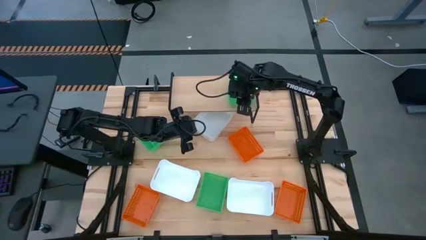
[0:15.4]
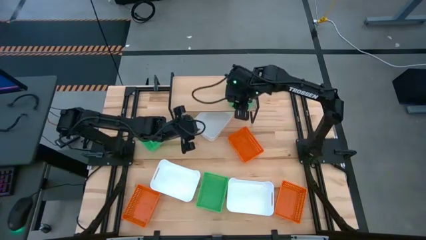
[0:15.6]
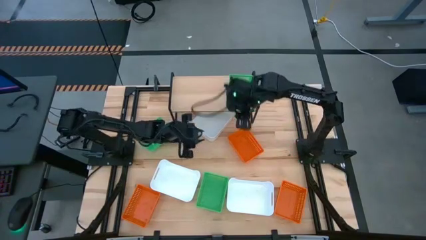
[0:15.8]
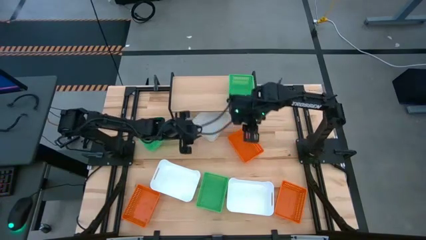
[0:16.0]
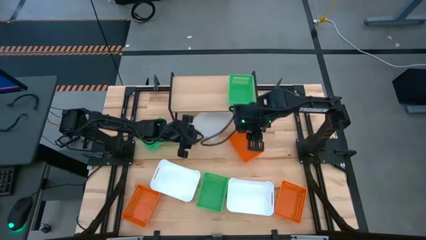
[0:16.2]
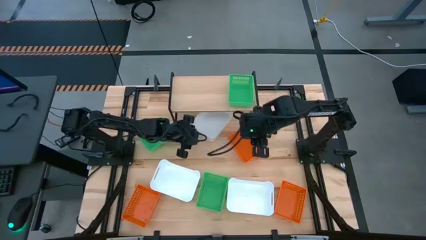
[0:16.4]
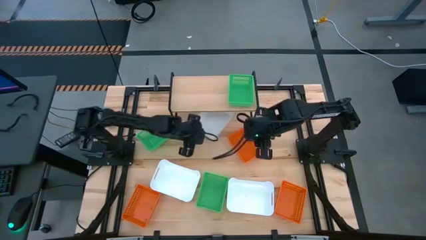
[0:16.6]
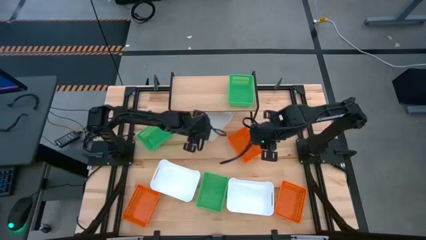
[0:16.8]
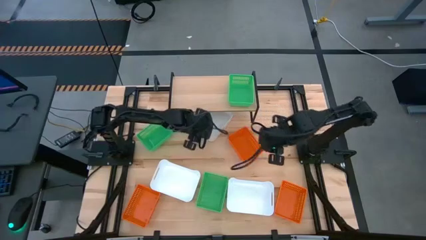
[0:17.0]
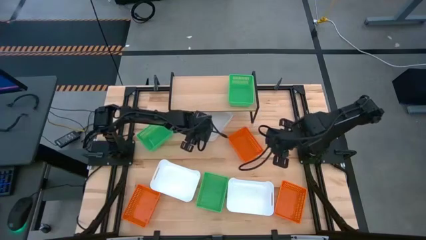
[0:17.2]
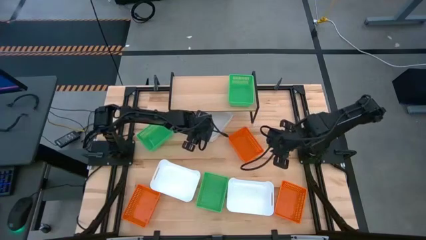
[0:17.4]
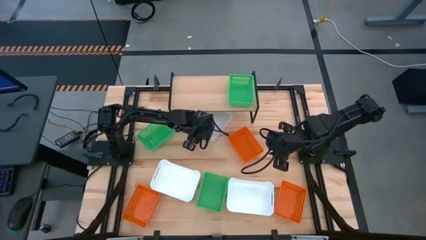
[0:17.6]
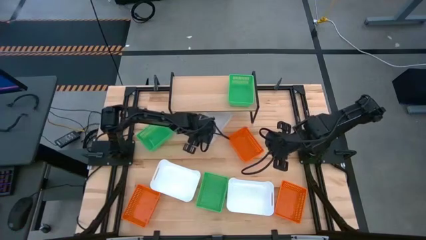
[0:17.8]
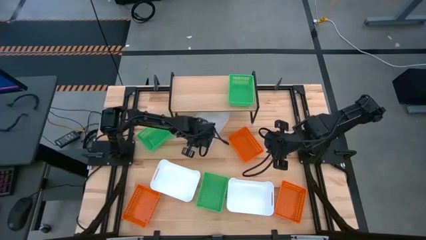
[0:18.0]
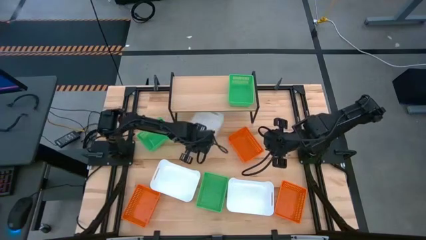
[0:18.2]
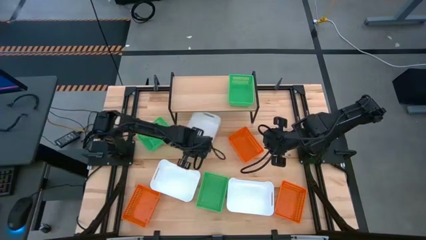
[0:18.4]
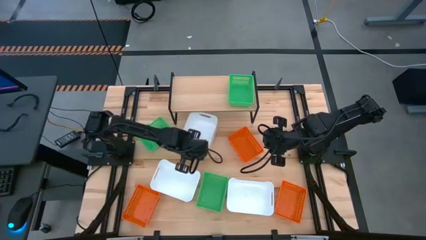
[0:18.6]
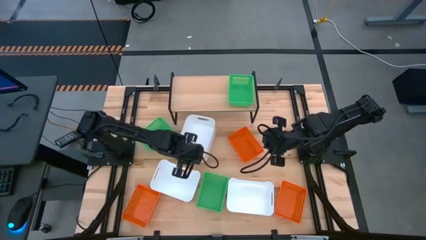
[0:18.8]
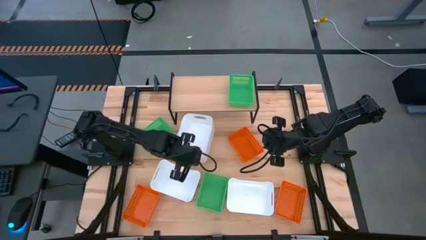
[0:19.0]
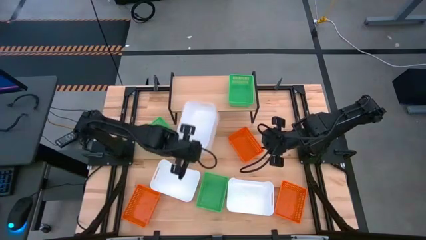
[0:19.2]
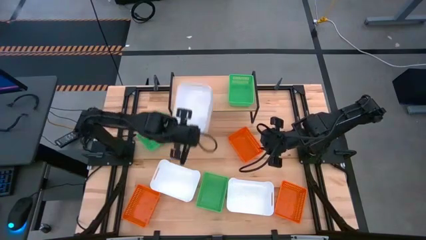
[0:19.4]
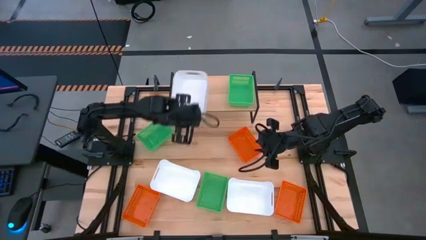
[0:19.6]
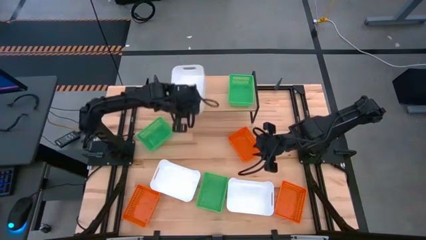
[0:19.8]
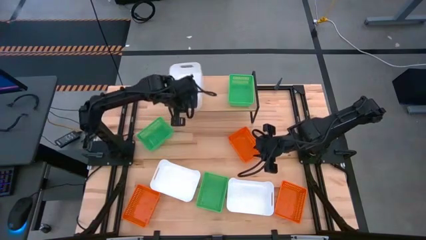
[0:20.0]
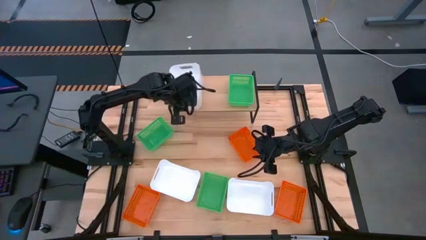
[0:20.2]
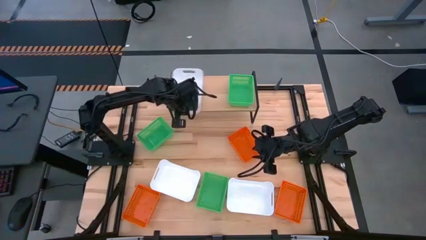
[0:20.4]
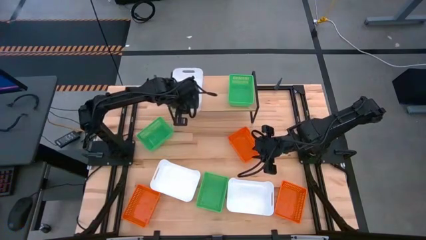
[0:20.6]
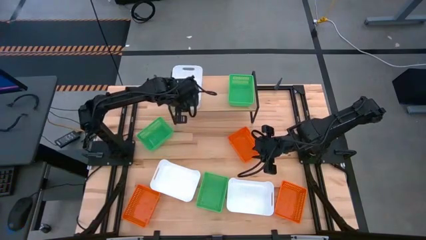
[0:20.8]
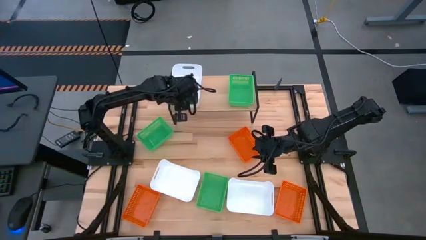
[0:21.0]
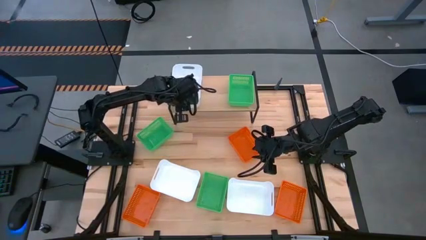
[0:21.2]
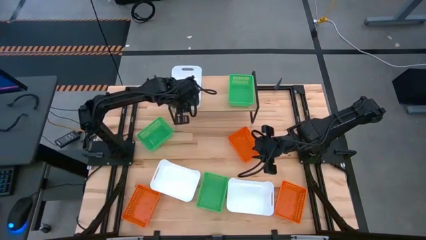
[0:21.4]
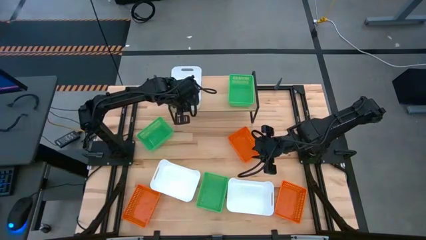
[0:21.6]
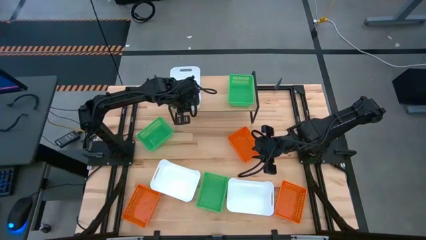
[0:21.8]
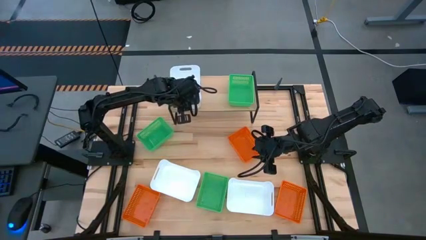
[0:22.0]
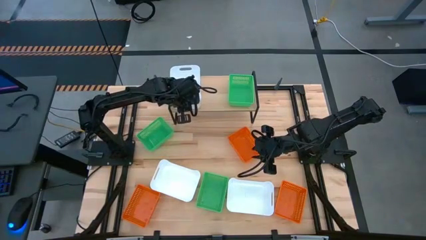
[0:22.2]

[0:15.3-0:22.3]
Task: Stack baskets on shelf by color
Put the top white bin on the shelf

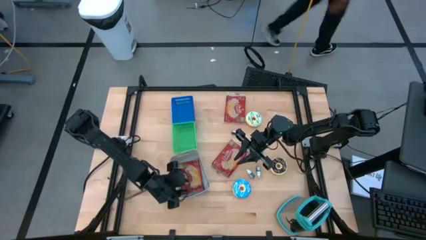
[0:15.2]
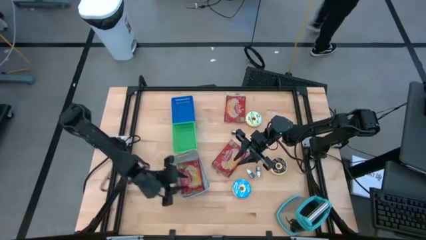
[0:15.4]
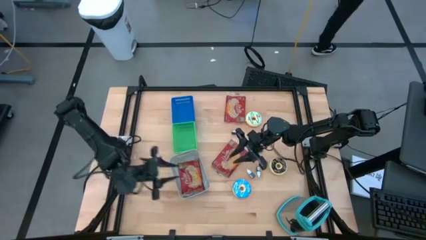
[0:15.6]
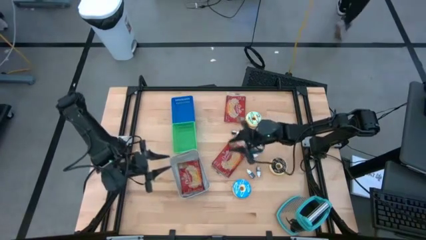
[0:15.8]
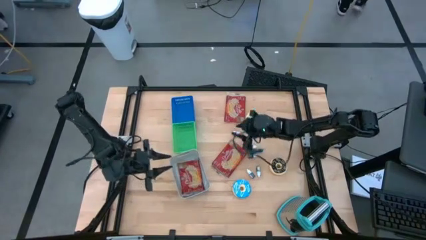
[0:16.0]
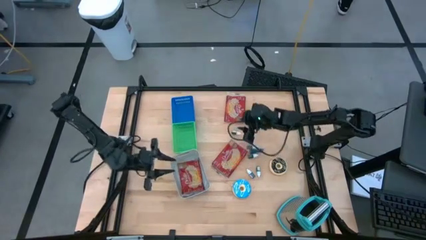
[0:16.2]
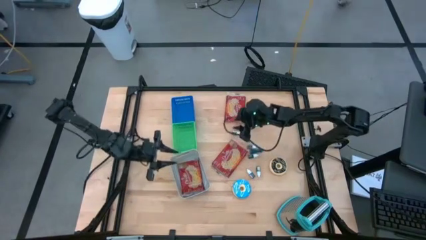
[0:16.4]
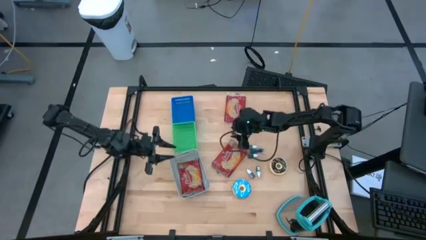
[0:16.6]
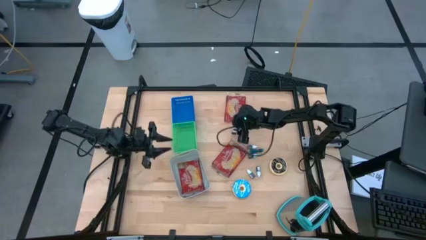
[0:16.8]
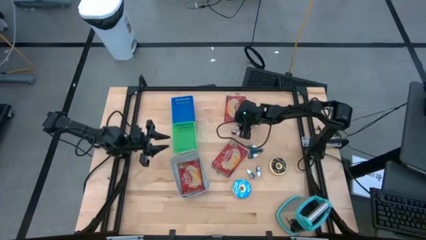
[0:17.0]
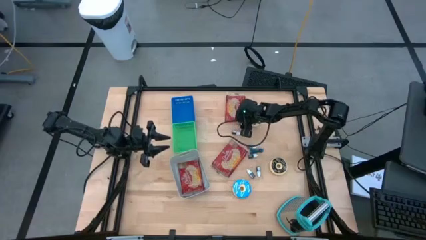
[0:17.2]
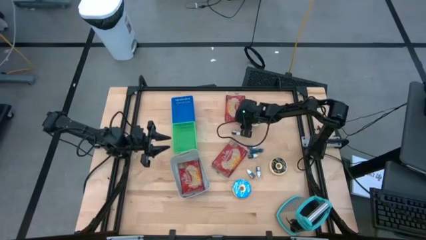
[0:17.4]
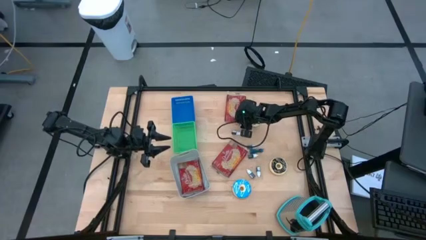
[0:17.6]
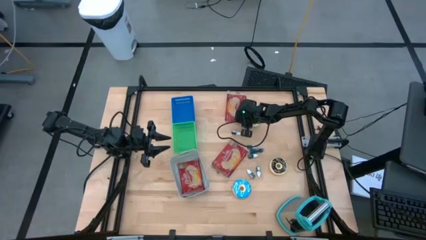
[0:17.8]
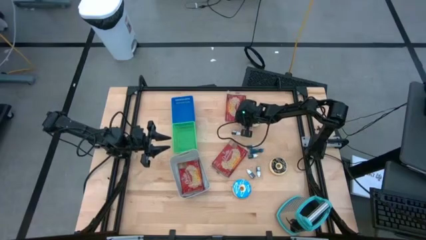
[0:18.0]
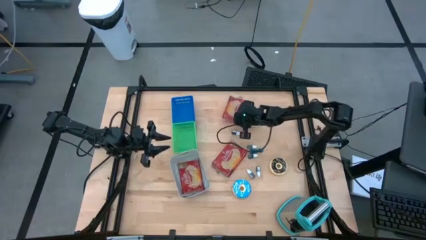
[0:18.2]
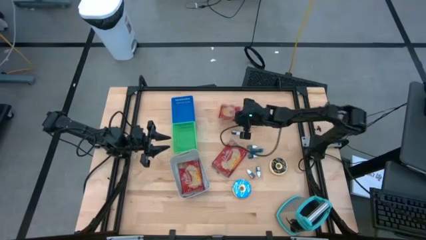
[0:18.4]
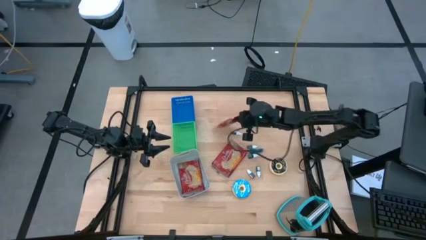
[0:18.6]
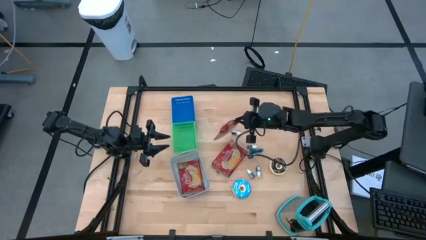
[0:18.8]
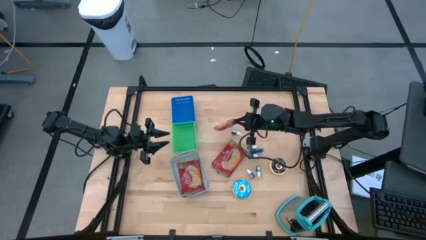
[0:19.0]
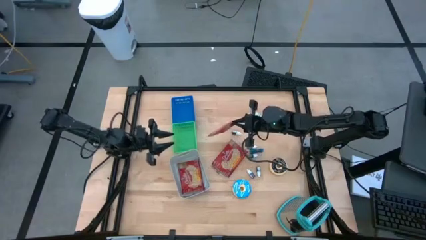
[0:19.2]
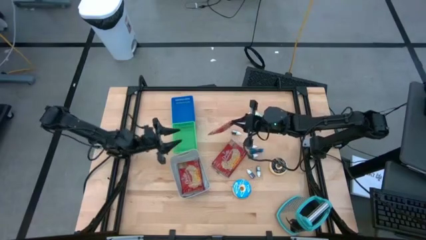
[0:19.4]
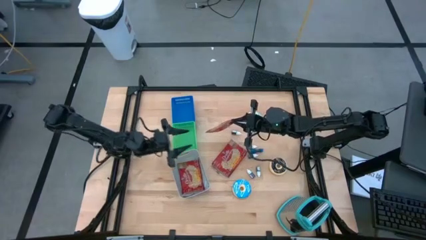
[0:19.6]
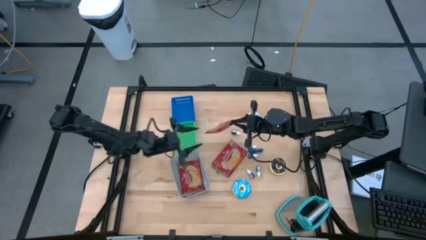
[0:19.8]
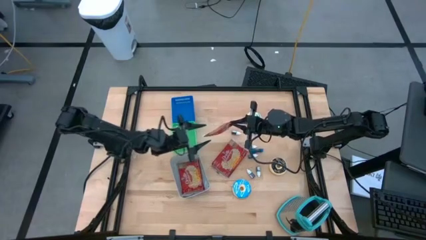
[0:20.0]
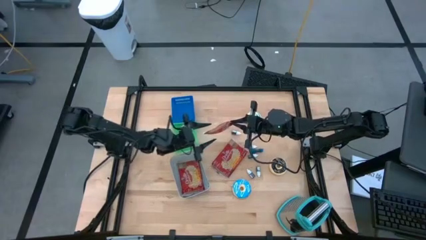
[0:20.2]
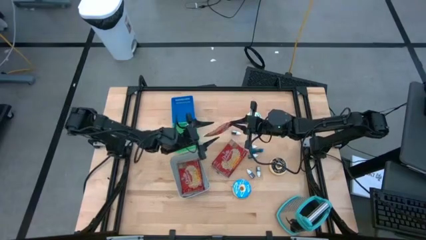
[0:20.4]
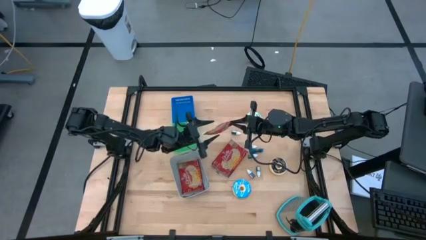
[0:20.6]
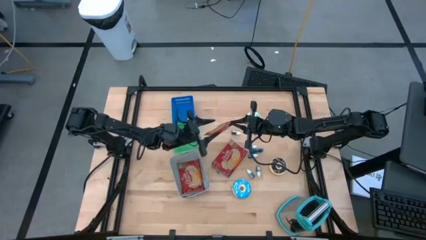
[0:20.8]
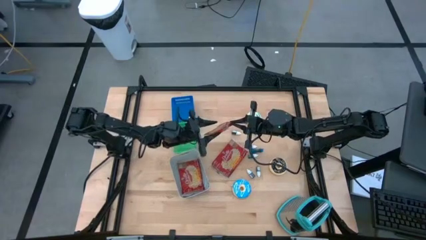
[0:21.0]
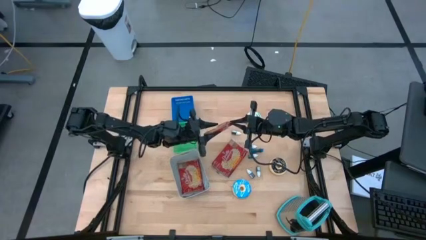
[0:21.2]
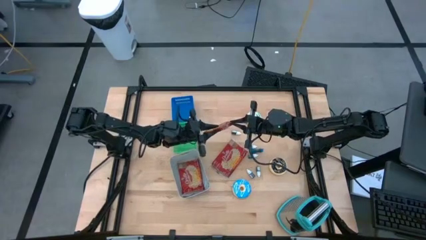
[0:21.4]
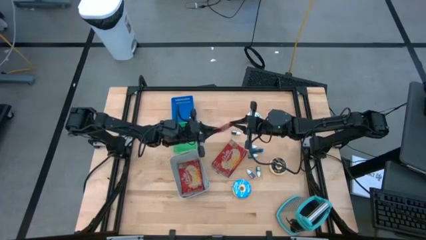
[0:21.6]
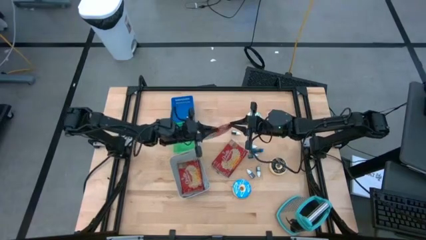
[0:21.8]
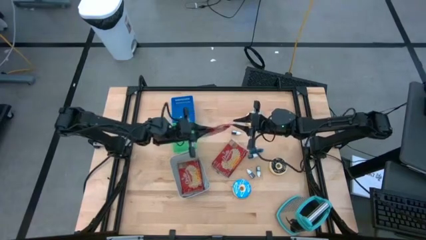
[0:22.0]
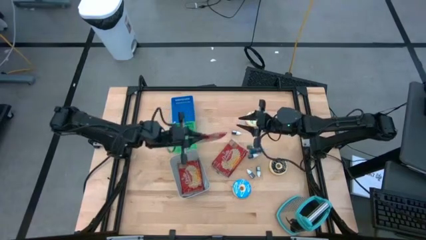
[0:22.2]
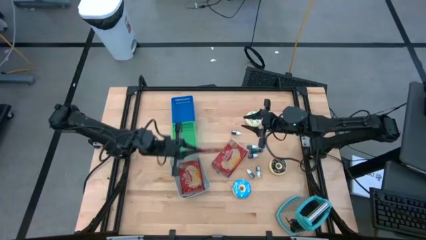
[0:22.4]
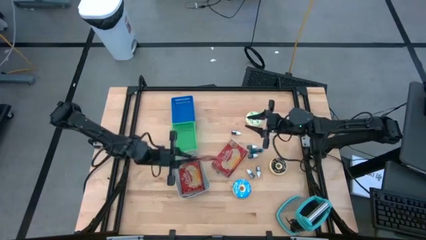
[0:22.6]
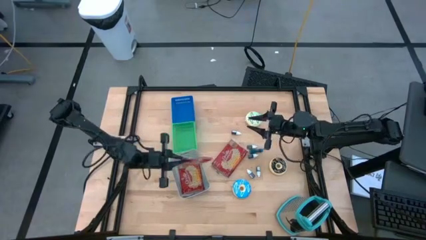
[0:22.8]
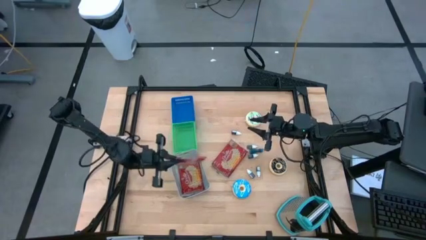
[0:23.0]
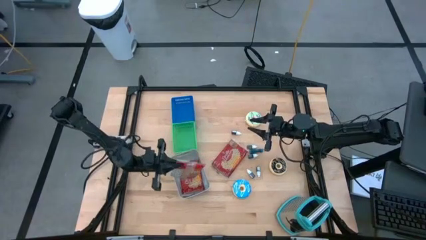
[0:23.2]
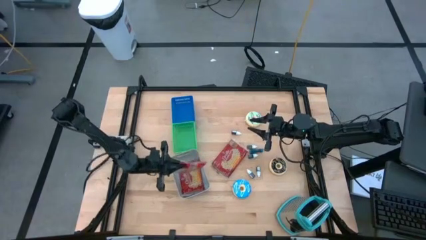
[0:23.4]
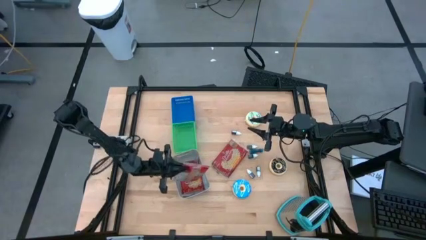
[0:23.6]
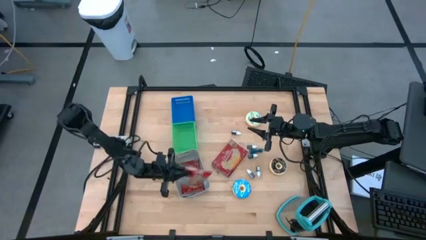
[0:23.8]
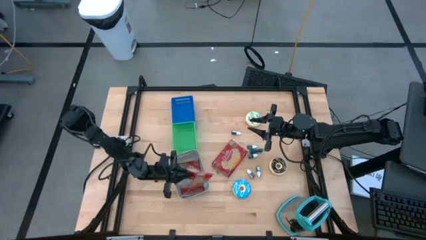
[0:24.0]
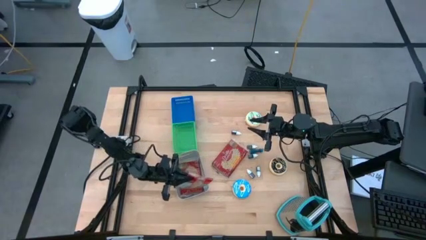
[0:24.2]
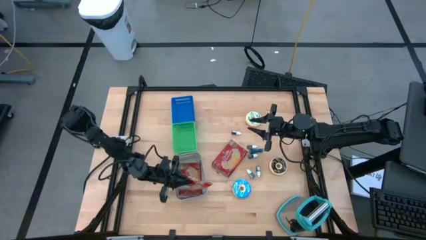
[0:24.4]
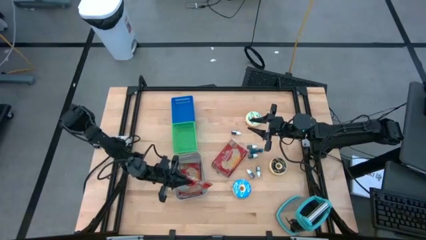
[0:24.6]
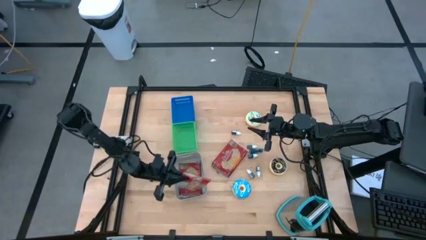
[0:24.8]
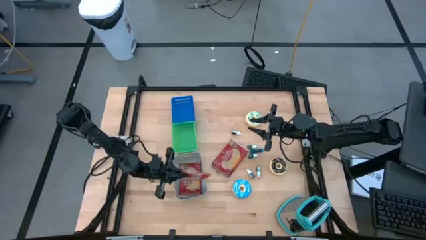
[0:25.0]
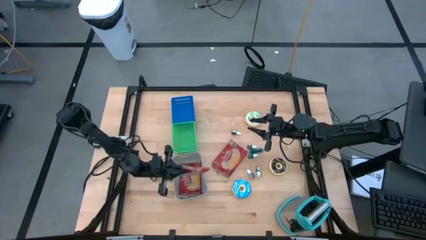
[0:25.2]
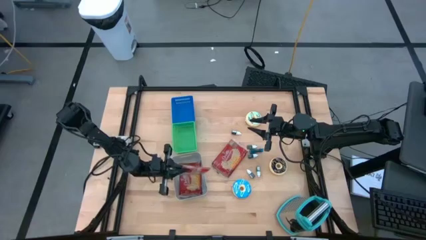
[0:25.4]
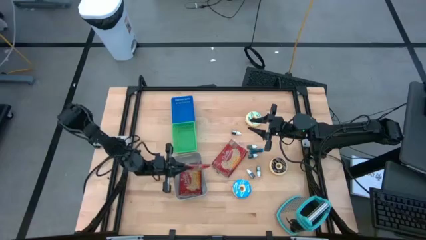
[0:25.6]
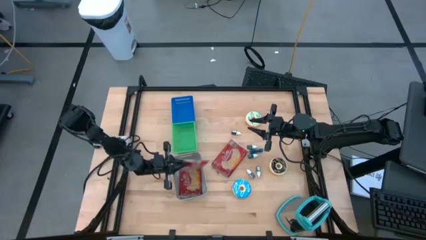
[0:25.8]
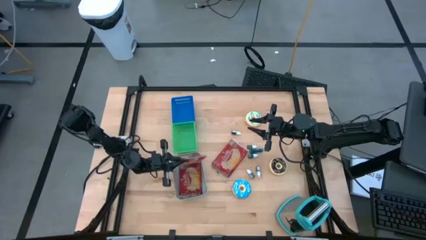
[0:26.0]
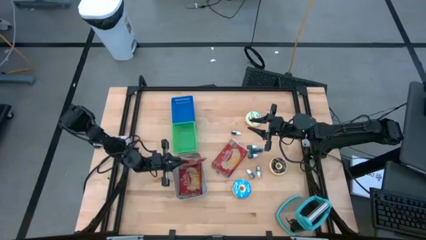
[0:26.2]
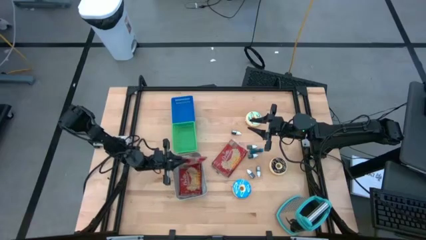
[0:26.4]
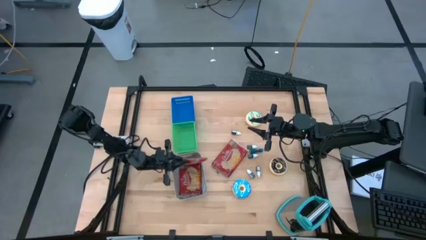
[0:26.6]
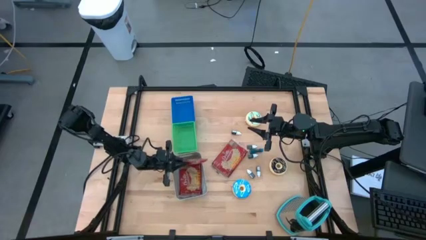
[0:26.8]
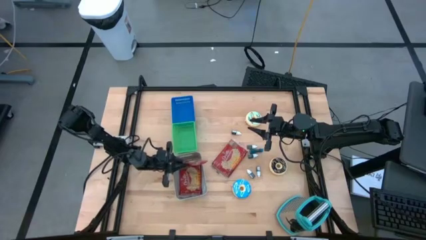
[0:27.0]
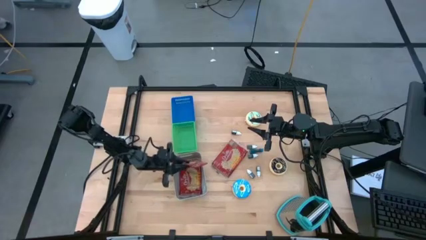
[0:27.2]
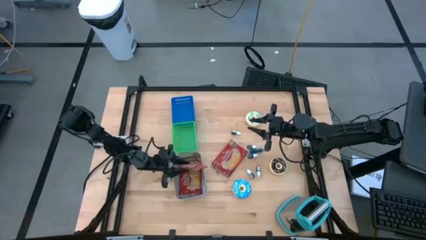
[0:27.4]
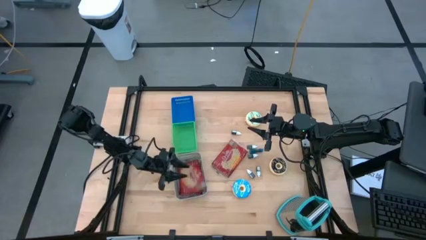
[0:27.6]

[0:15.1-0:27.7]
Task: Pick & Place Food Item
Put the top popcorn pack into the gray bin
